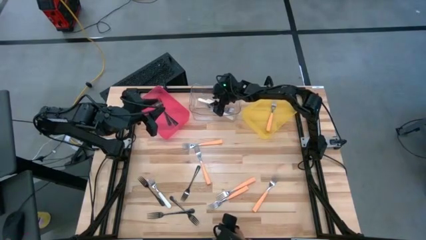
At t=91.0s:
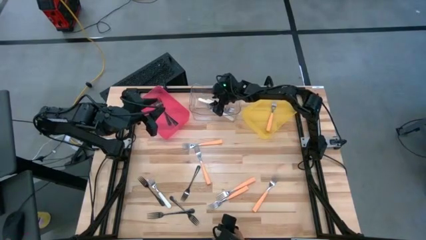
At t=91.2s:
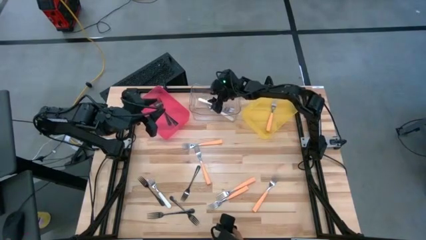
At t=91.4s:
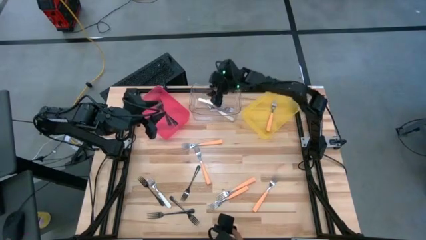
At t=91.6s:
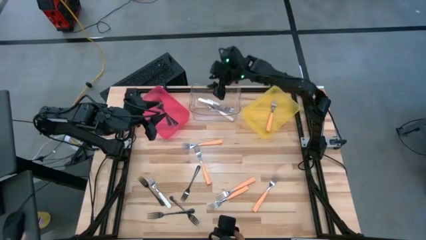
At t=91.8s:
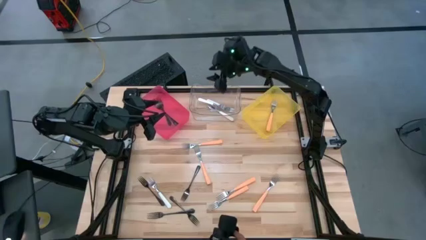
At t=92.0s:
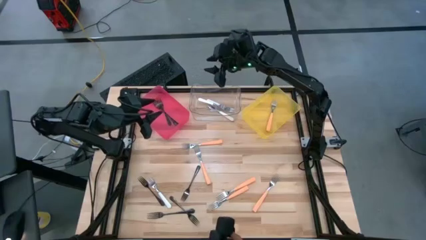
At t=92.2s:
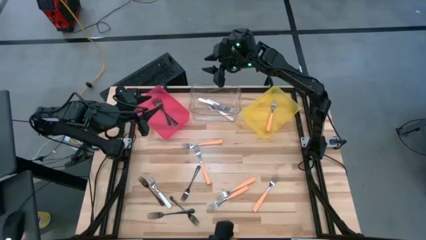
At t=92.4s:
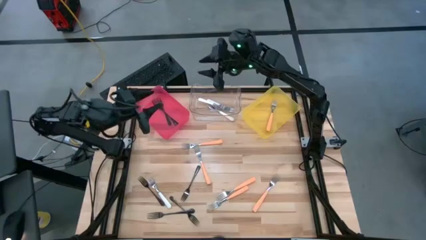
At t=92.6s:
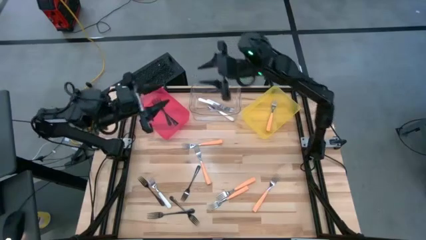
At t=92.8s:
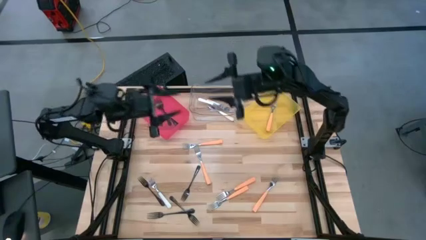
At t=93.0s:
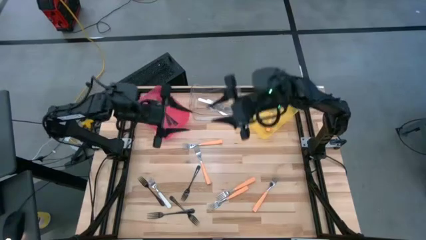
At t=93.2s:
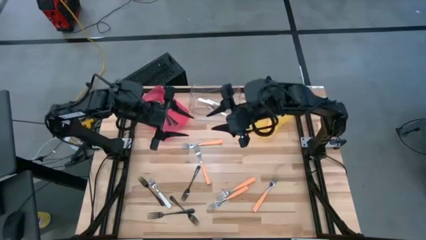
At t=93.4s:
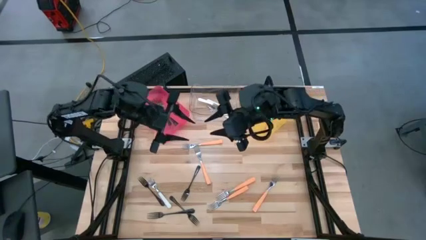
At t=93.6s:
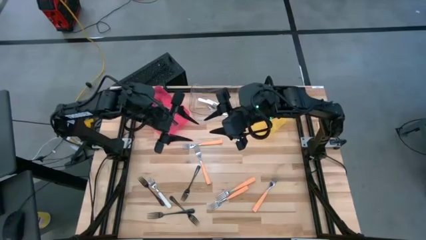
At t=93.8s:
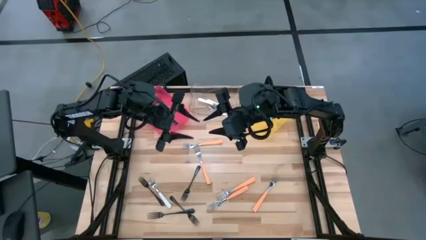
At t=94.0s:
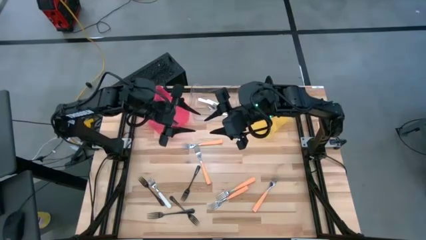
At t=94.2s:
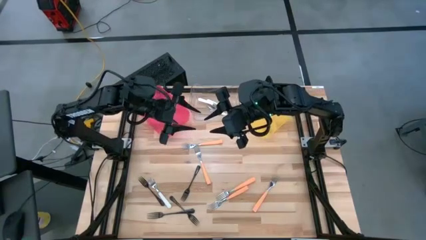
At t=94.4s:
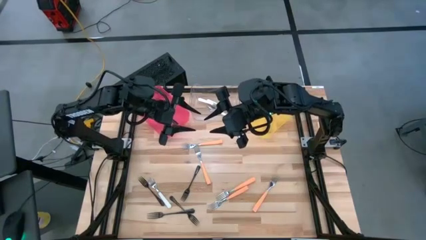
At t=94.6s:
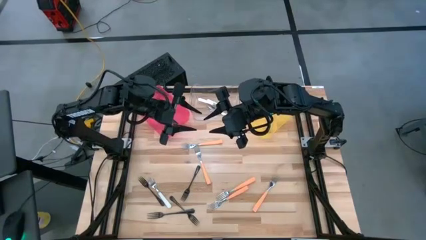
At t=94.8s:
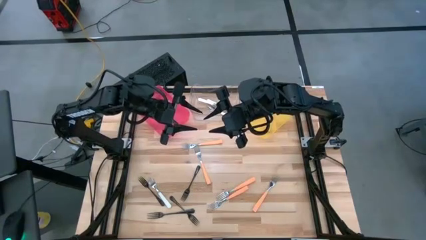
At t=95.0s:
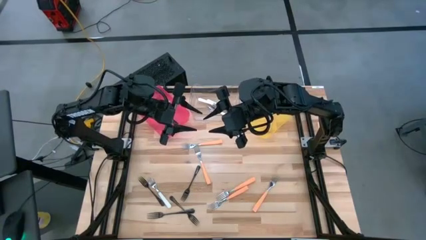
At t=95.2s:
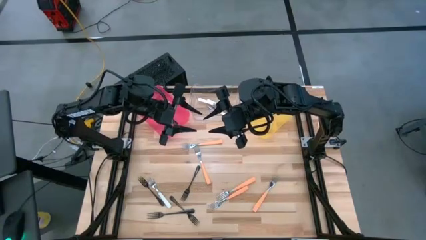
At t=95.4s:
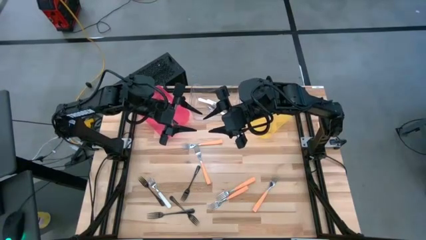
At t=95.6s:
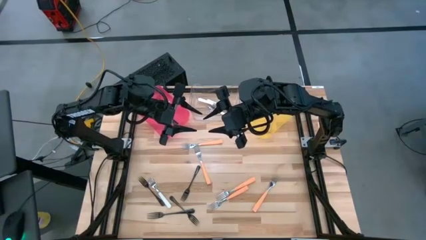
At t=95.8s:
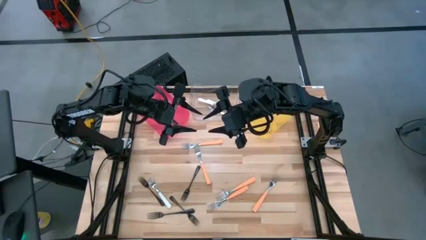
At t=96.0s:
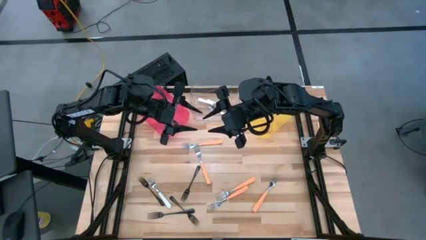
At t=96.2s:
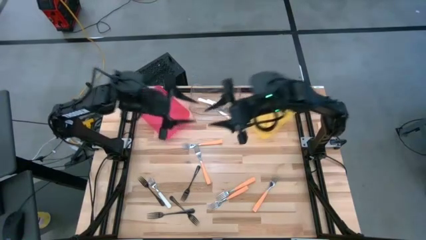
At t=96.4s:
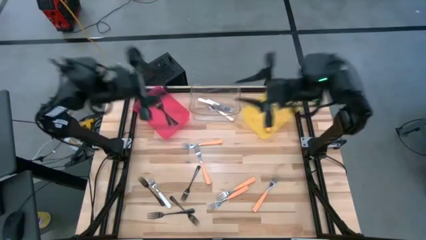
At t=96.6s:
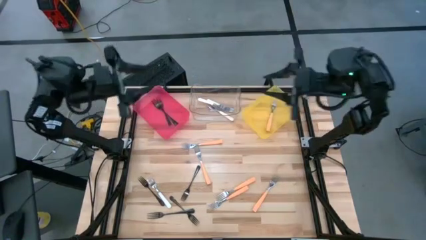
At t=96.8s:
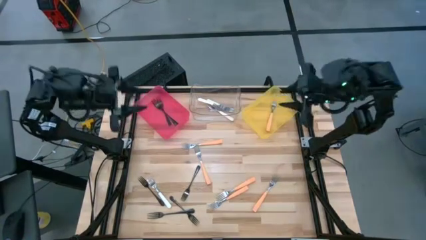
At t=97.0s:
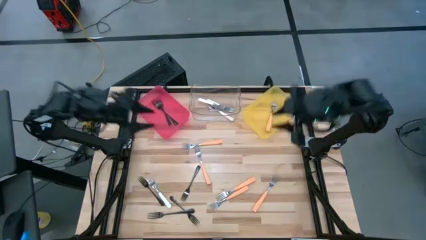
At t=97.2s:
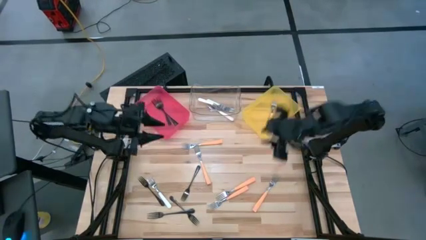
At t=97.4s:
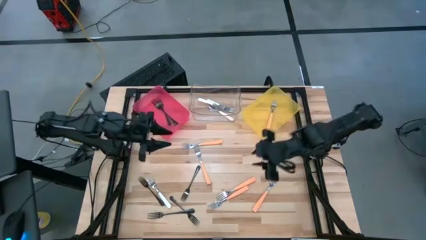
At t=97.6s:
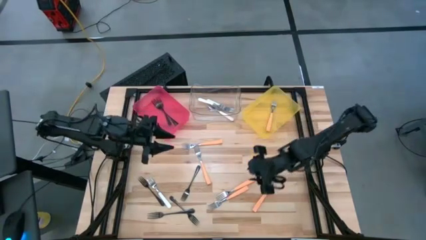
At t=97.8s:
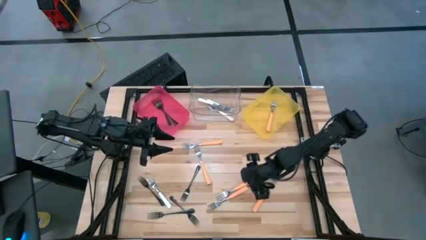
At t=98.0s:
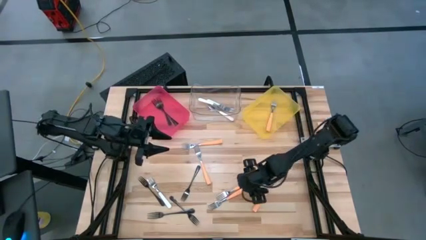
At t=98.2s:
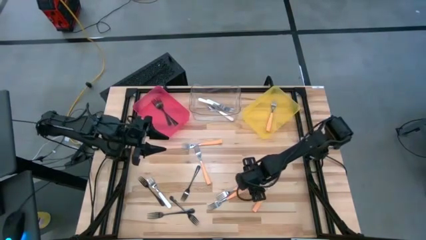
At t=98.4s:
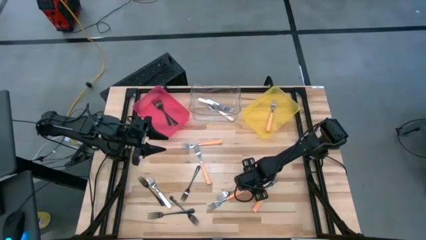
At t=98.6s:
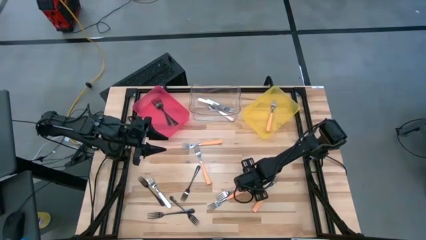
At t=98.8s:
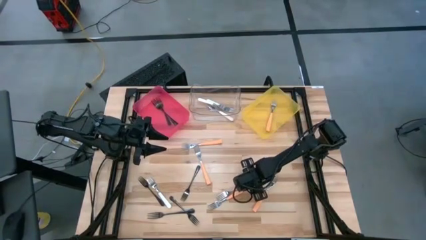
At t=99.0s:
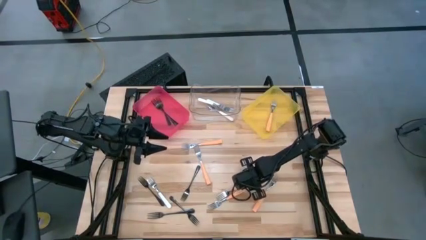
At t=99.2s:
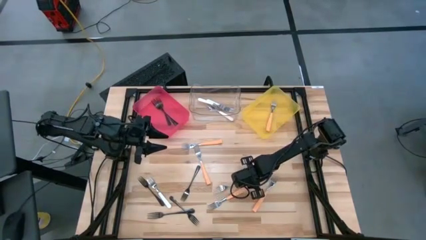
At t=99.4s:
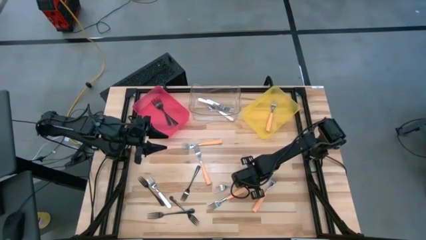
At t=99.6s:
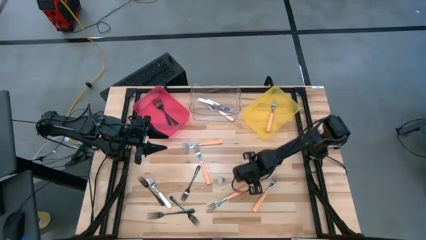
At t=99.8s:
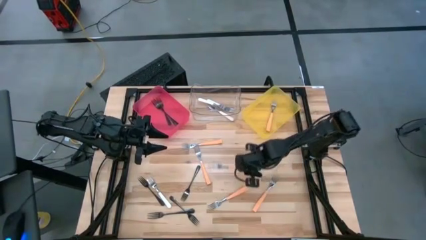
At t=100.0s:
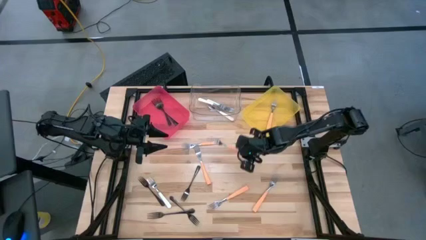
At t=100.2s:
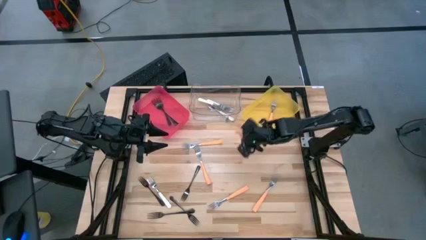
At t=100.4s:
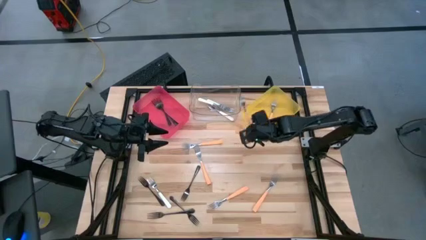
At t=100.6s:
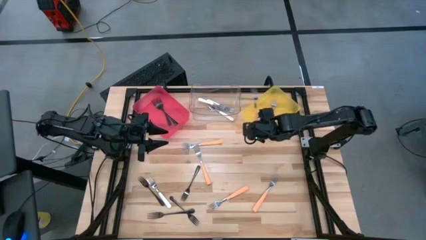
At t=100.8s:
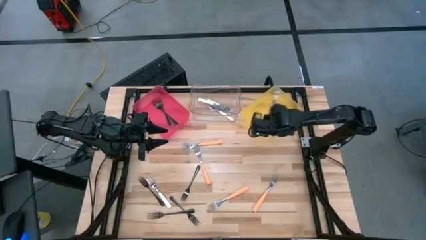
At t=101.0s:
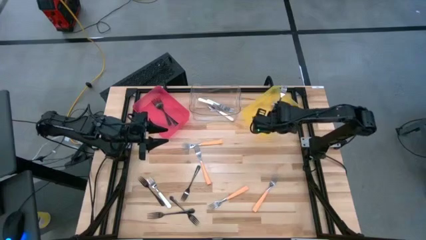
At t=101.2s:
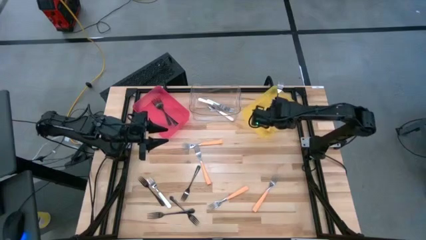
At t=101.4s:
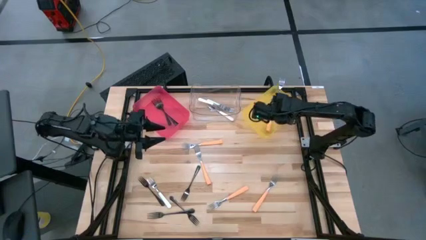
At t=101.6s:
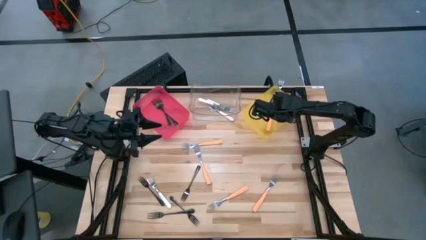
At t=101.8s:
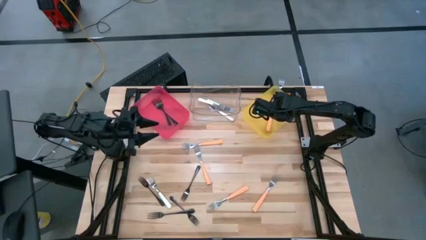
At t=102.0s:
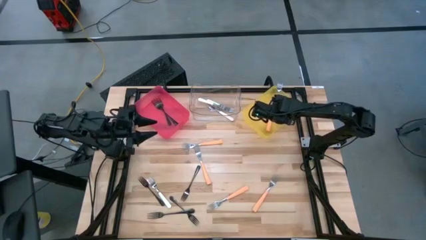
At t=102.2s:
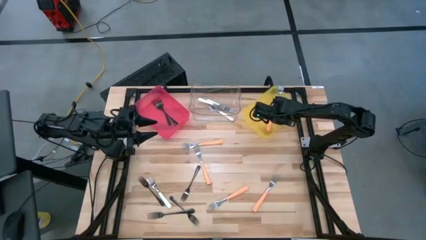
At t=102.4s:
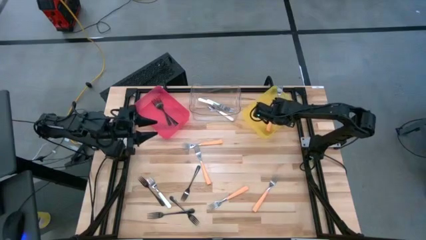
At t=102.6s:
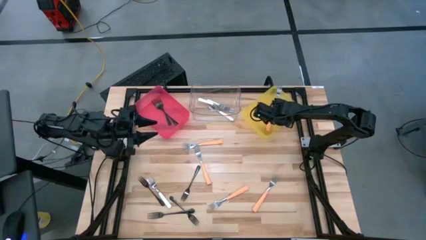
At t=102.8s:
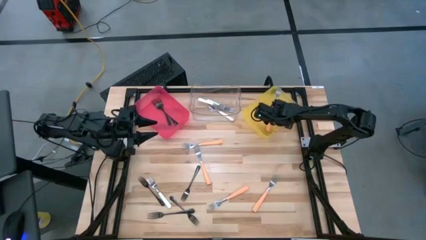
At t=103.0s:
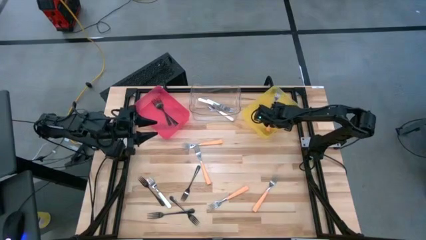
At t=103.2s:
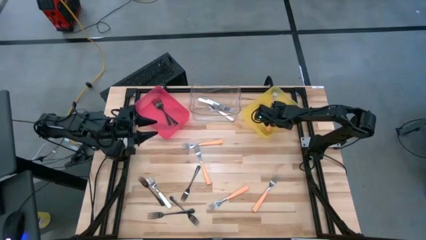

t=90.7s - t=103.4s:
Task: Sort silverware by color (type)
Put the orange fork into the yellow bin

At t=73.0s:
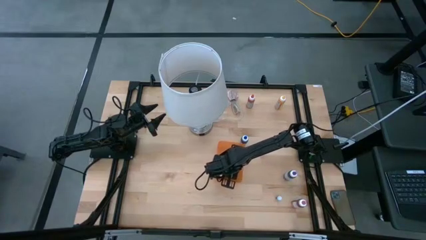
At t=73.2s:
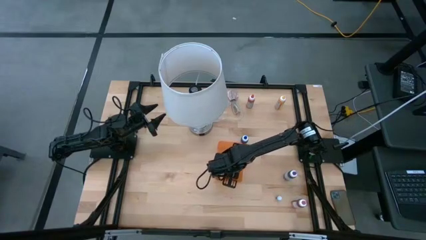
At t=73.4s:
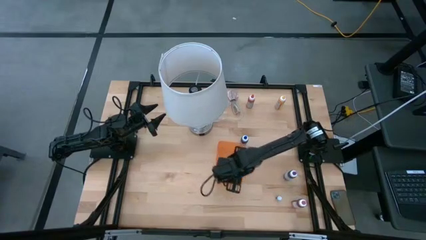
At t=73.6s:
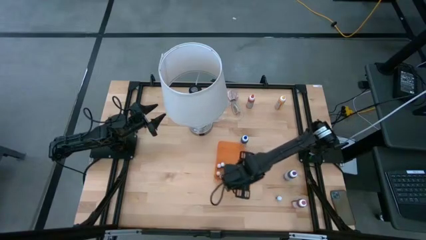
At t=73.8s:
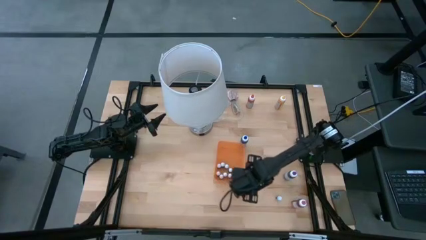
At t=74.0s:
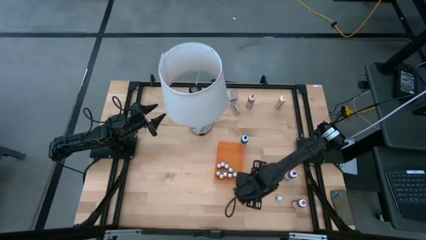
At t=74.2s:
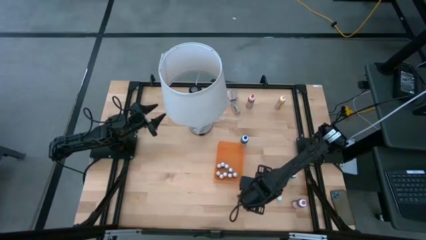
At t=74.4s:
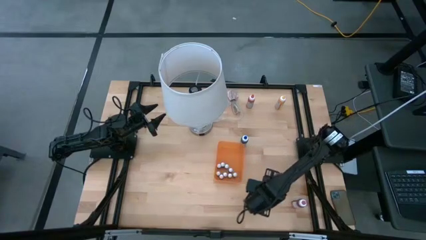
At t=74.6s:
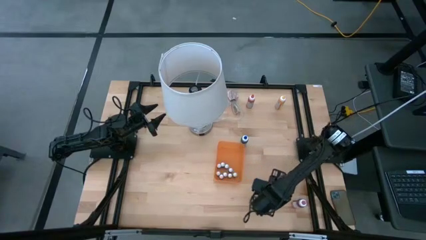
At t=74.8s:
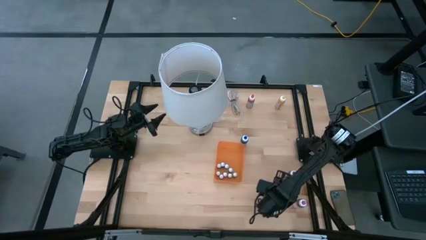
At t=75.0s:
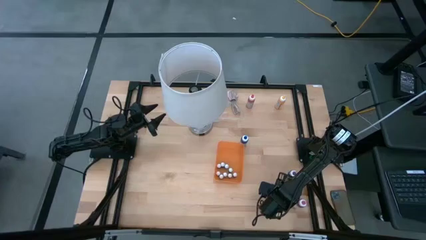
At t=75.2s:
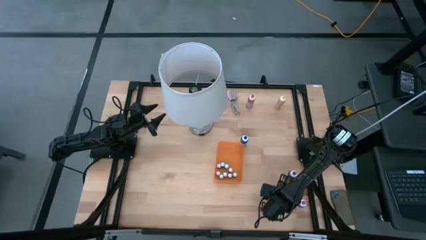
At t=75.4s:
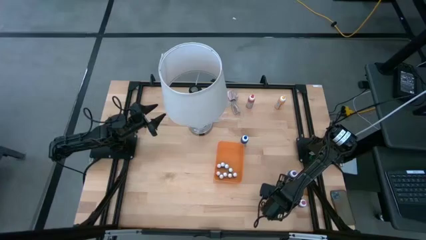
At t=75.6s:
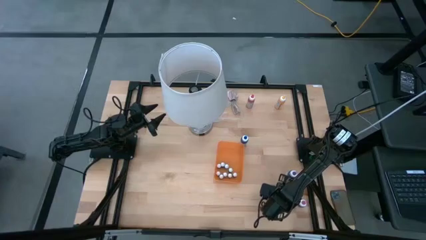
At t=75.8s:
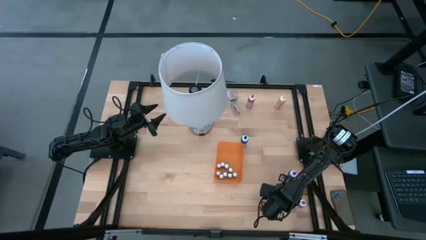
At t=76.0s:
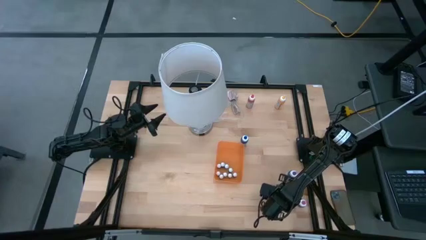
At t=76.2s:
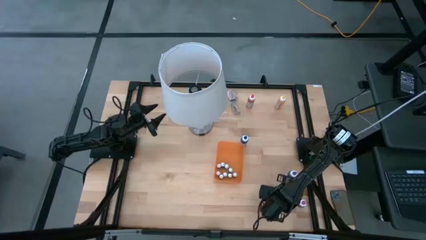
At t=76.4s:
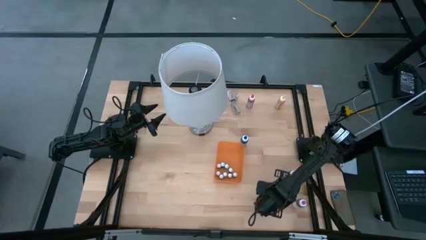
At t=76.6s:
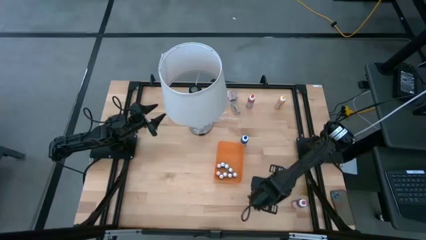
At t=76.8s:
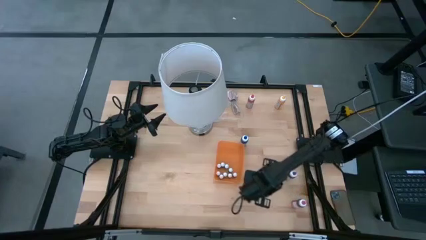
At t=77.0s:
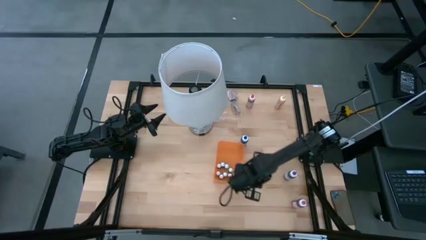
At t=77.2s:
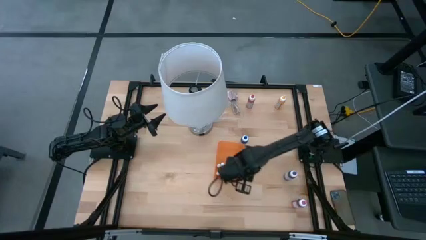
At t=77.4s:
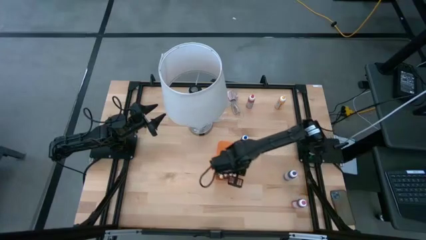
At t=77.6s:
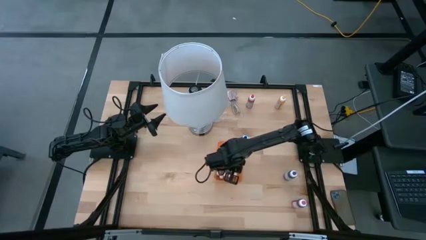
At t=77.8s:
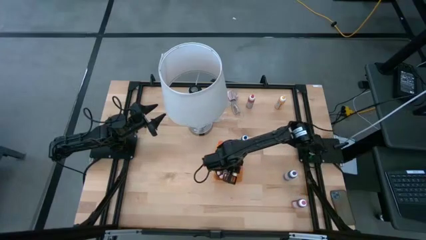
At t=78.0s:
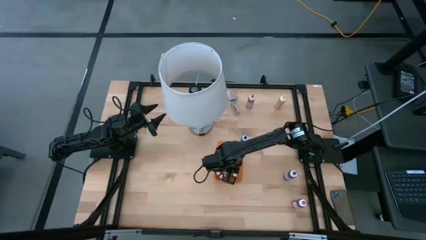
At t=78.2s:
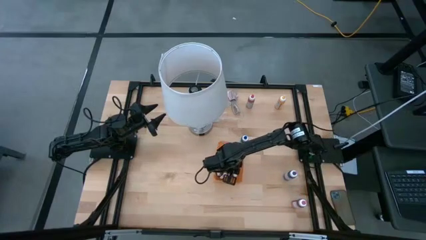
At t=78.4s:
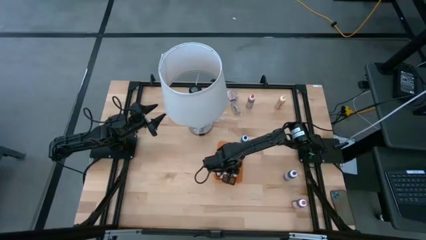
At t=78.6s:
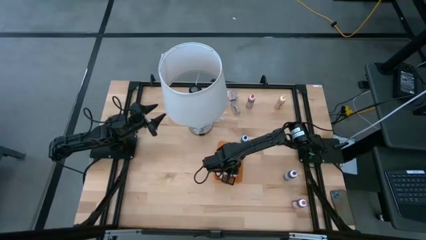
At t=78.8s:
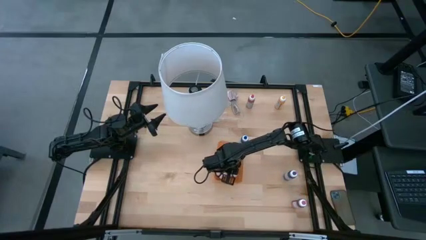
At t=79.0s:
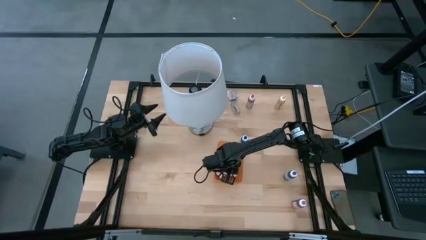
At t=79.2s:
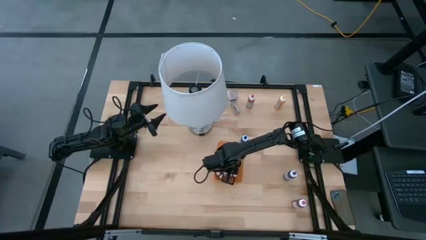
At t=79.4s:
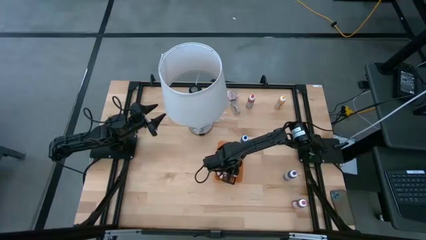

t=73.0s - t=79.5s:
Task: Pick & Place food coloring
Put the small green food coloring bottle into the orange bin
